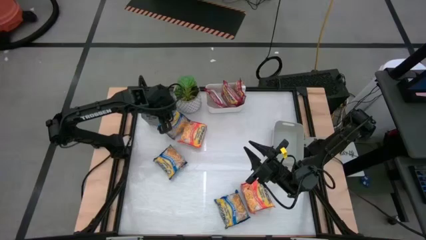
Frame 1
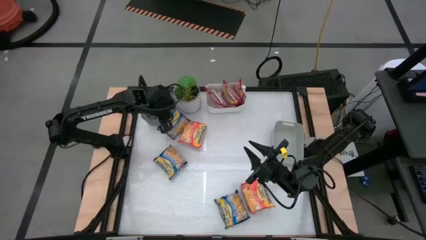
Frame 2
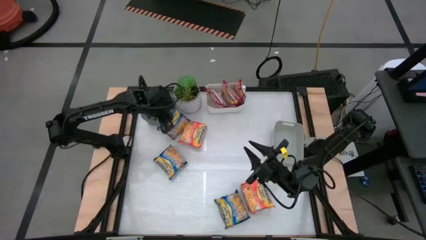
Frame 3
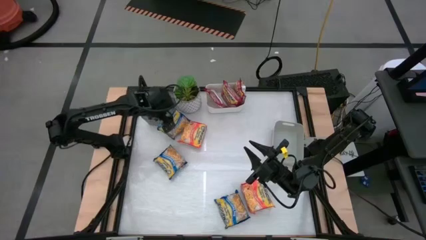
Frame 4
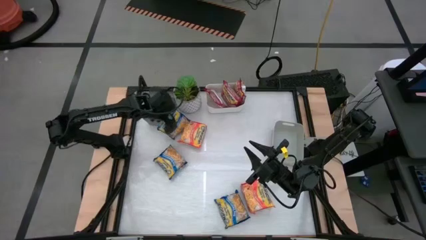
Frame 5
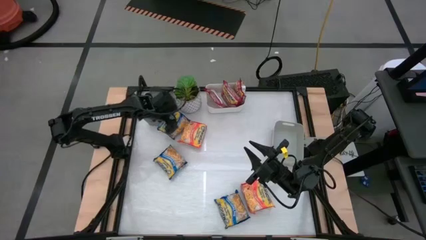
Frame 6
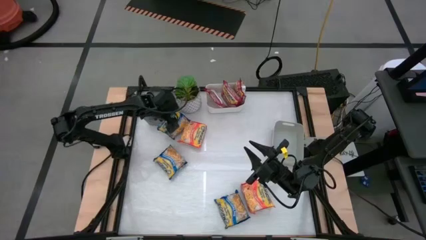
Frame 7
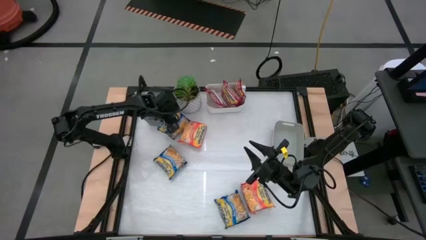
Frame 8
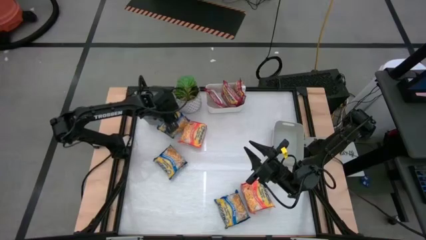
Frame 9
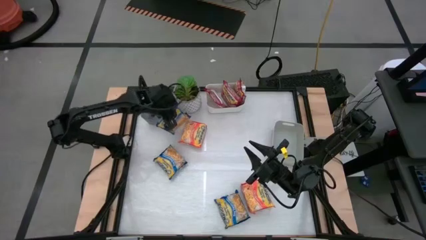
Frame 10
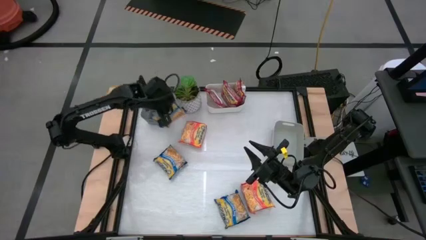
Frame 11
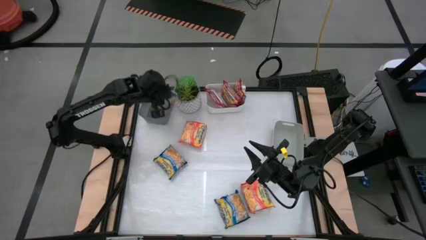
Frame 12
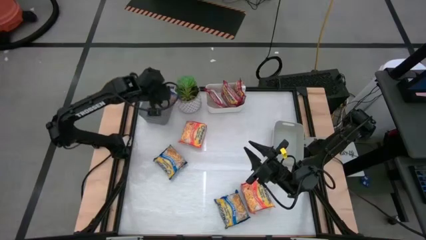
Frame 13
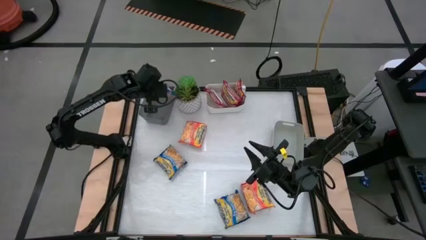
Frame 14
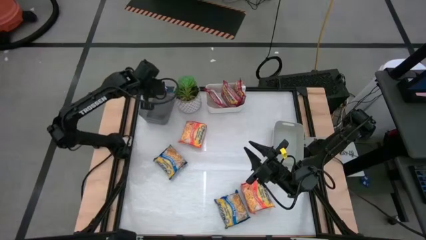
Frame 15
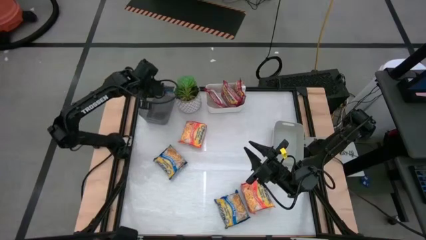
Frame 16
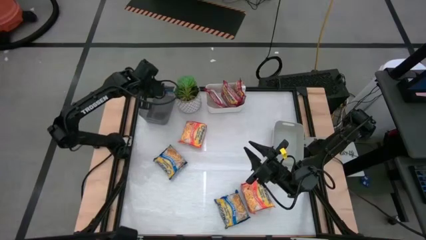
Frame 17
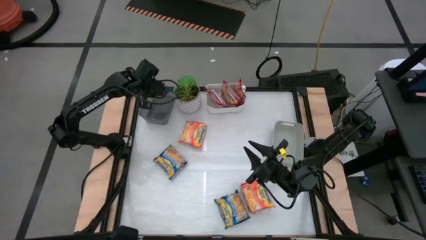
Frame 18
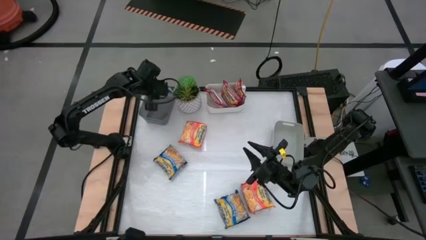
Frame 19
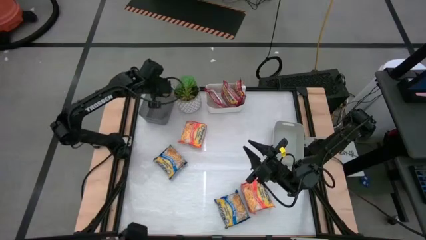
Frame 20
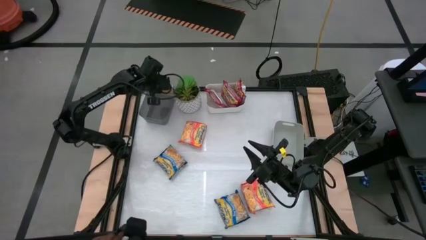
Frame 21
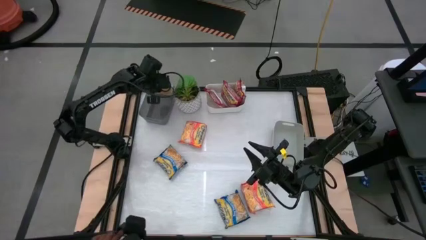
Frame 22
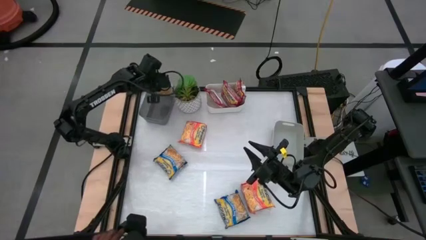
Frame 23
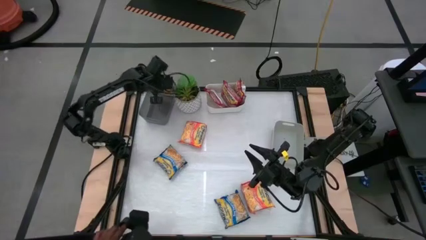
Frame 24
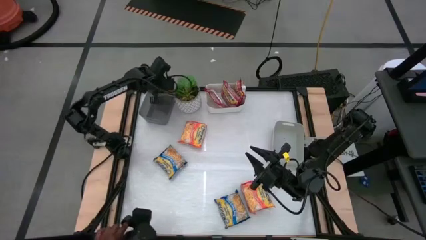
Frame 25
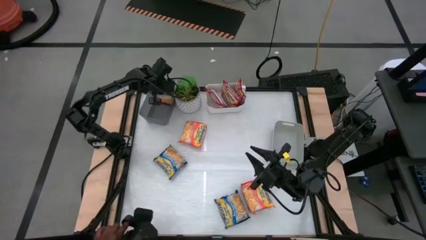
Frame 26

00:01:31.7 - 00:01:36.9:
Task: Sort Maruchan noodles
Put the middle blue noodle pack into the black bin

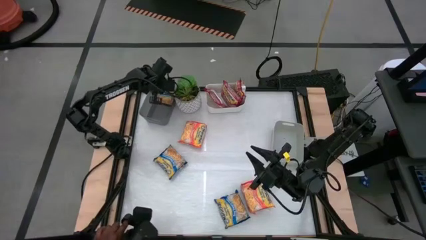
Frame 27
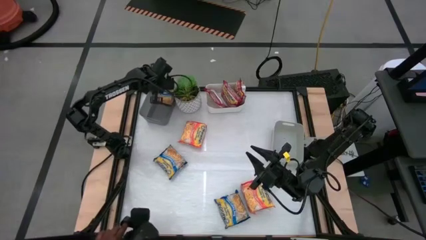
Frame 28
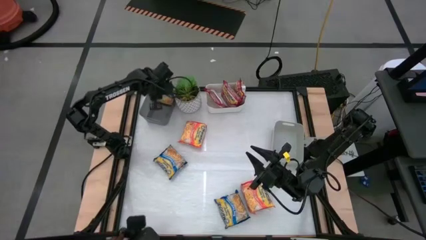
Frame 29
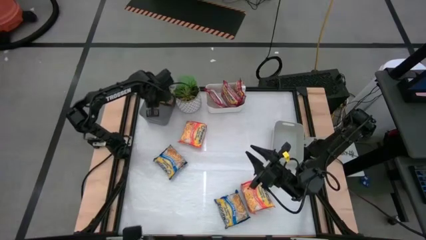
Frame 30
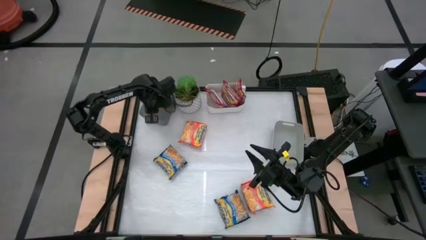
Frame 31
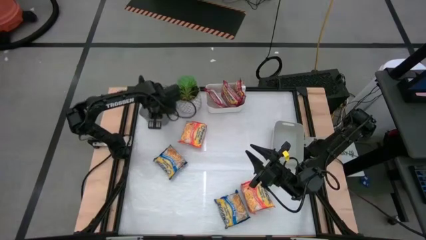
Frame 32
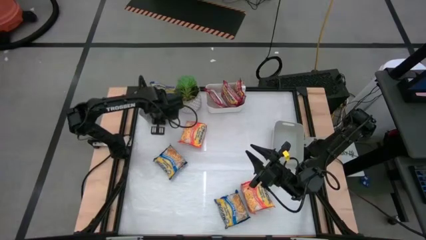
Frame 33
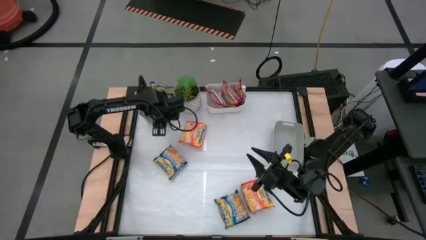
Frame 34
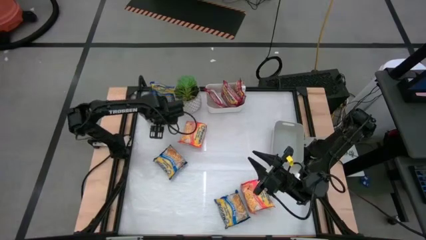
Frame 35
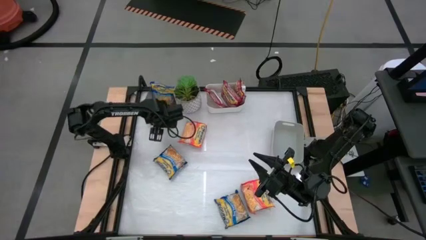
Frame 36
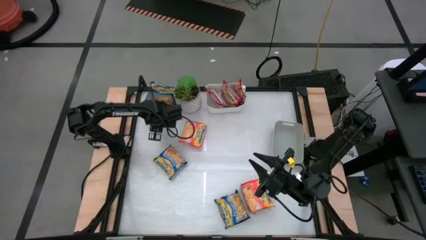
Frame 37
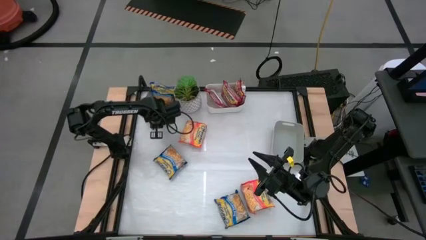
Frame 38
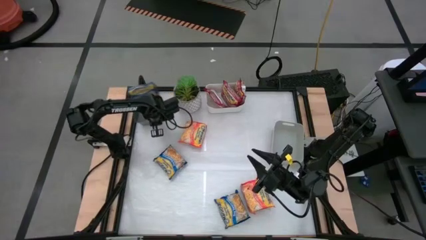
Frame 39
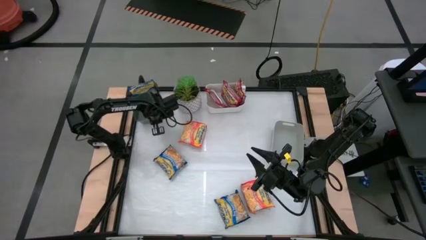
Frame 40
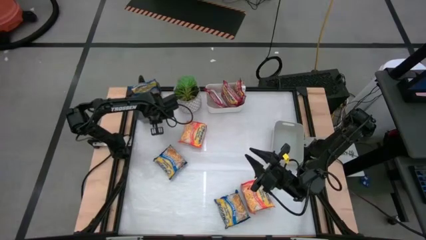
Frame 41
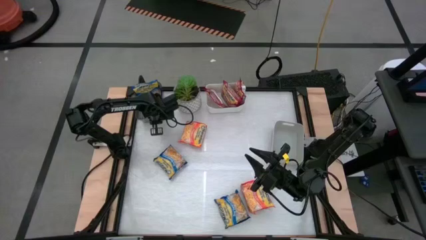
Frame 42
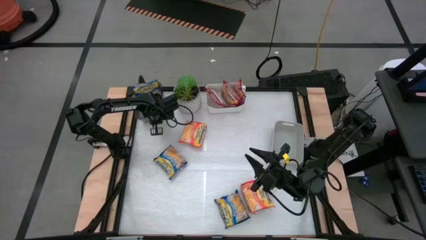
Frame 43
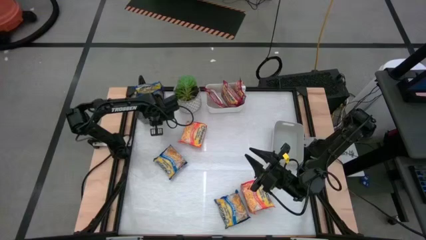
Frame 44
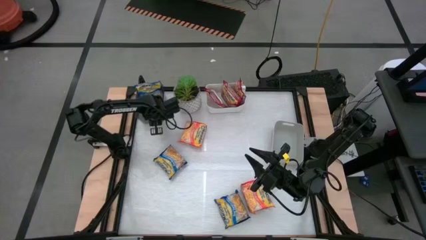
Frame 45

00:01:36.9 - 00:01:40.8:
Adjust the black bin

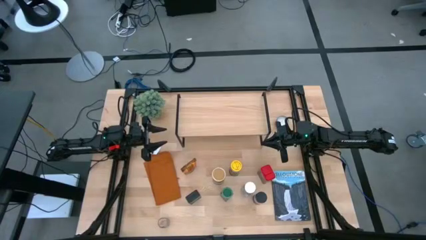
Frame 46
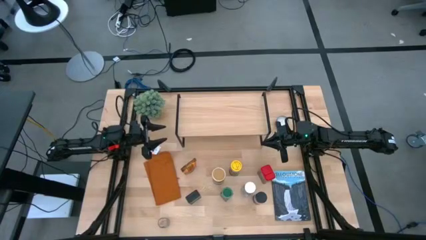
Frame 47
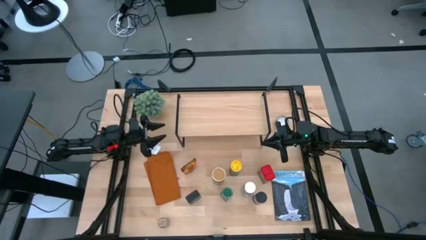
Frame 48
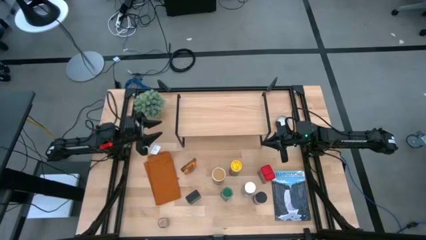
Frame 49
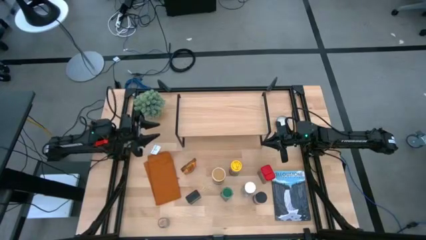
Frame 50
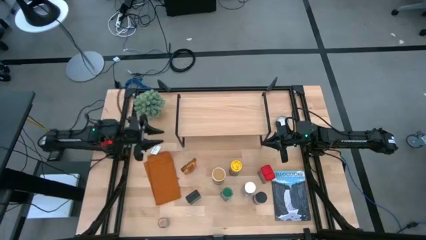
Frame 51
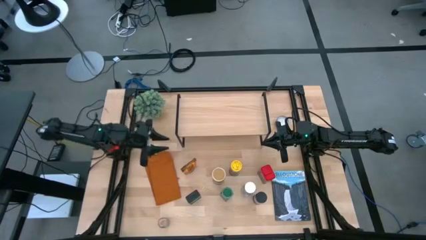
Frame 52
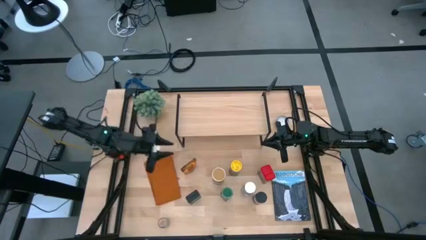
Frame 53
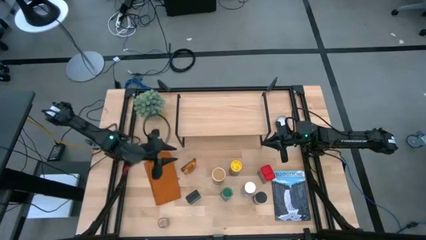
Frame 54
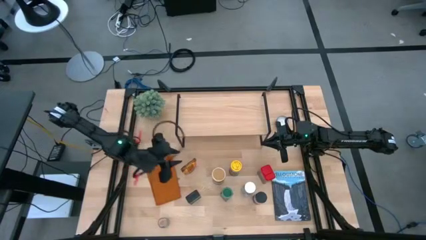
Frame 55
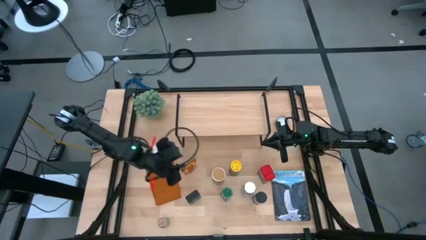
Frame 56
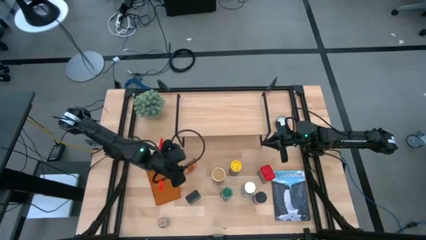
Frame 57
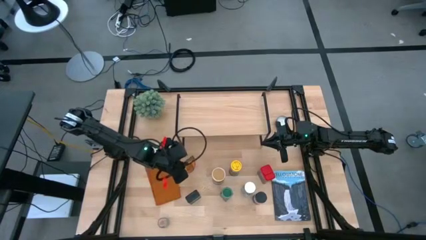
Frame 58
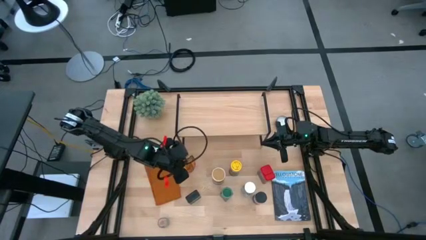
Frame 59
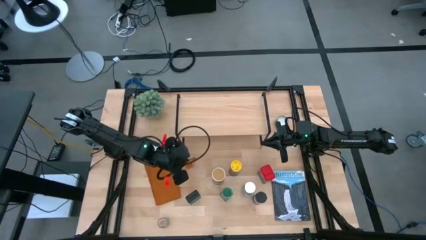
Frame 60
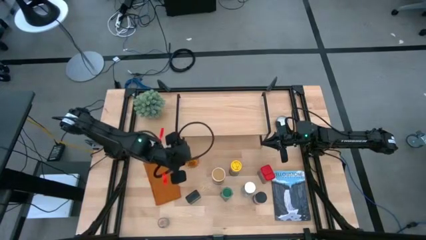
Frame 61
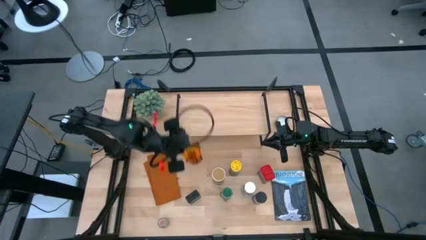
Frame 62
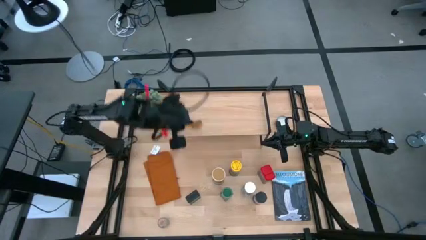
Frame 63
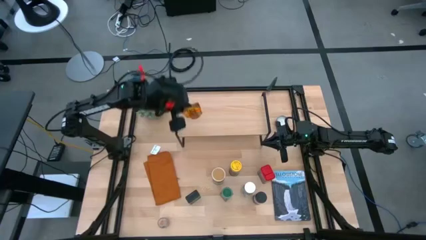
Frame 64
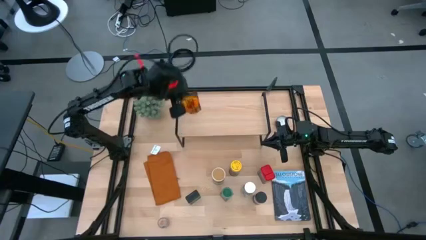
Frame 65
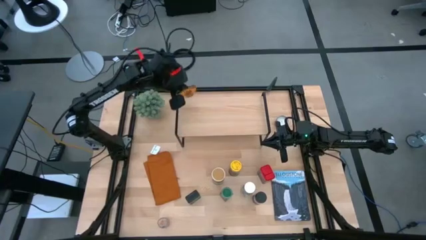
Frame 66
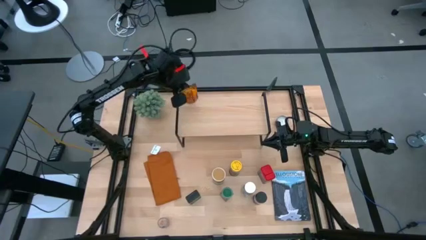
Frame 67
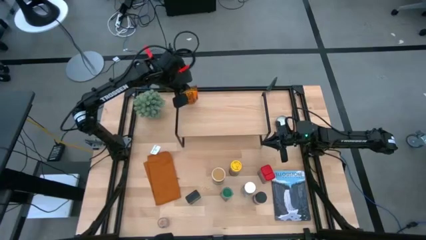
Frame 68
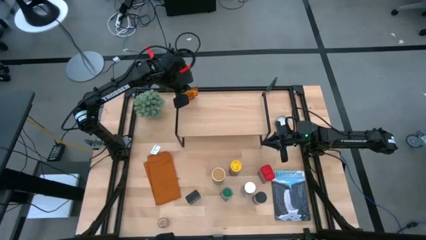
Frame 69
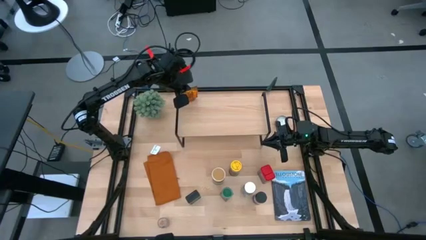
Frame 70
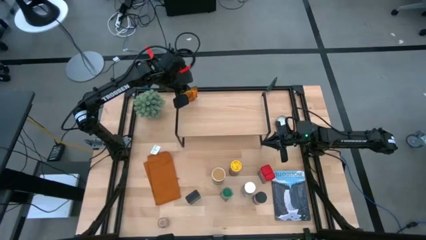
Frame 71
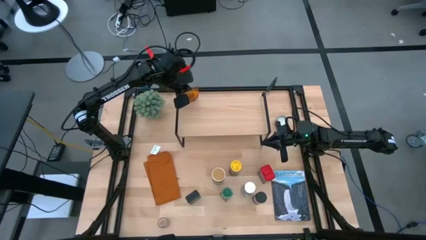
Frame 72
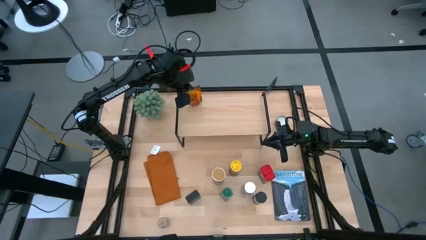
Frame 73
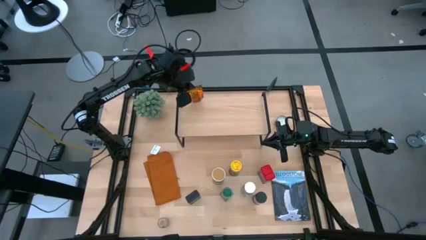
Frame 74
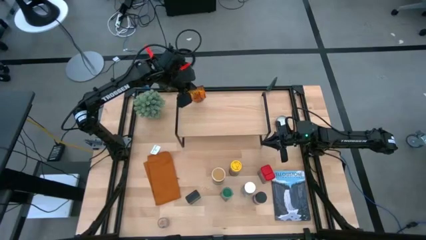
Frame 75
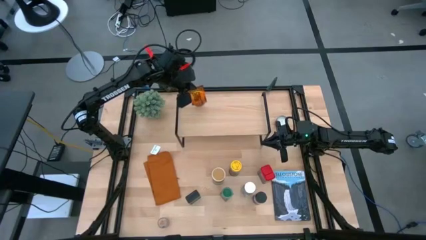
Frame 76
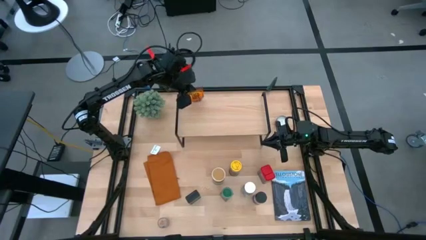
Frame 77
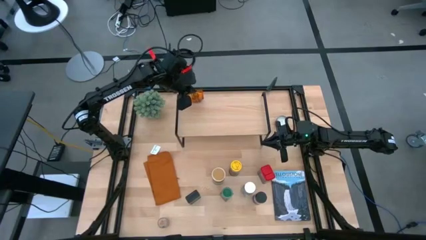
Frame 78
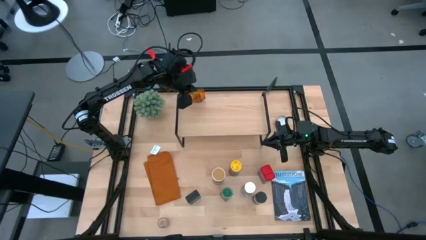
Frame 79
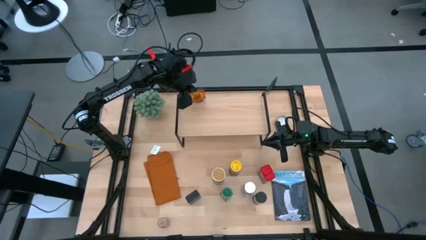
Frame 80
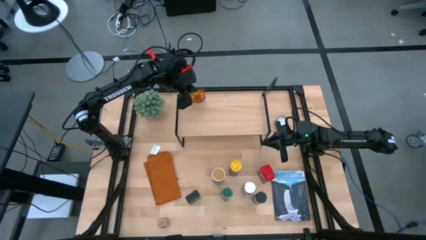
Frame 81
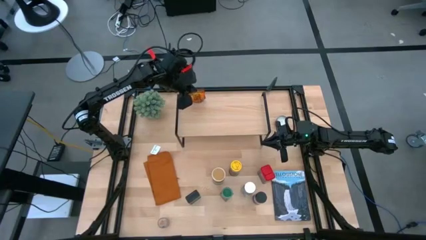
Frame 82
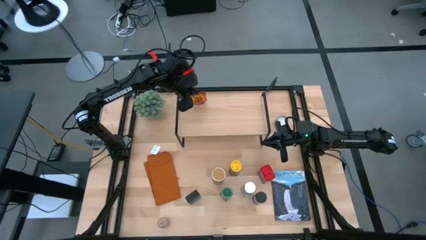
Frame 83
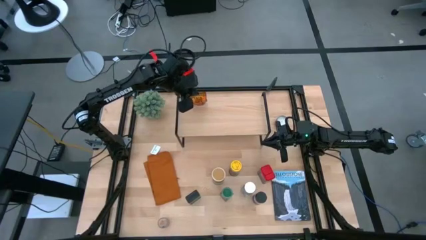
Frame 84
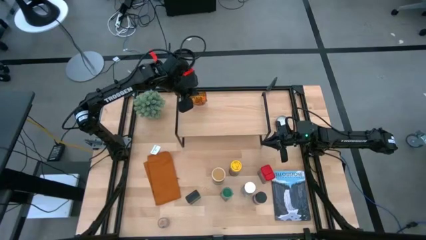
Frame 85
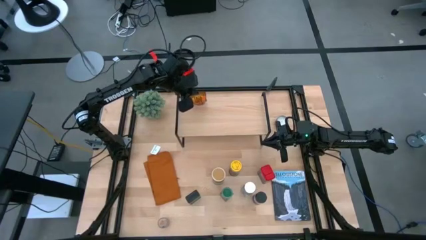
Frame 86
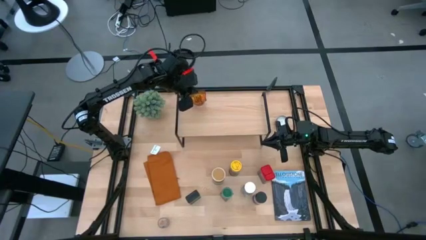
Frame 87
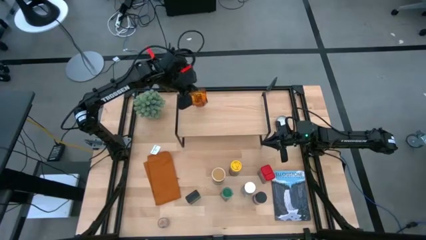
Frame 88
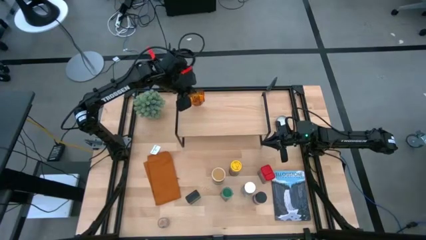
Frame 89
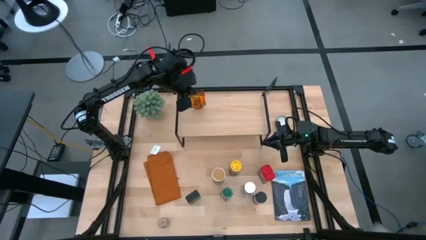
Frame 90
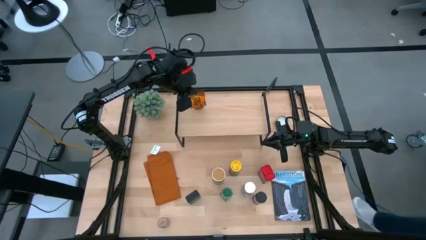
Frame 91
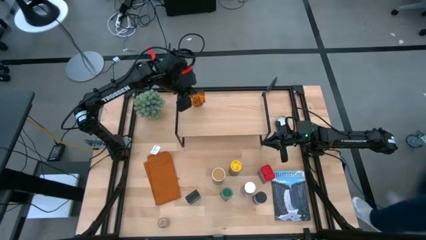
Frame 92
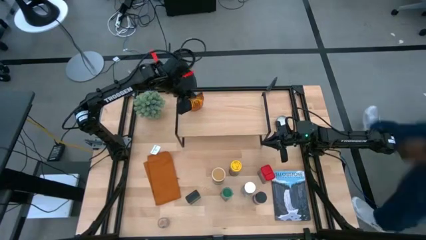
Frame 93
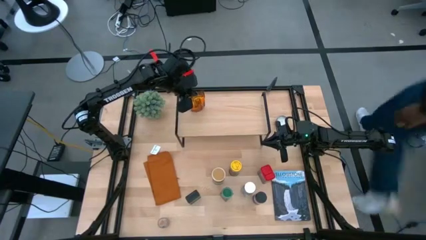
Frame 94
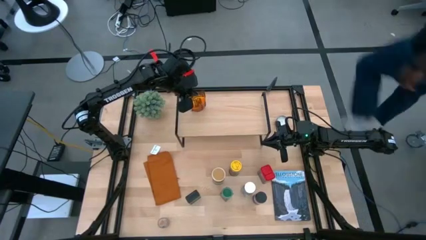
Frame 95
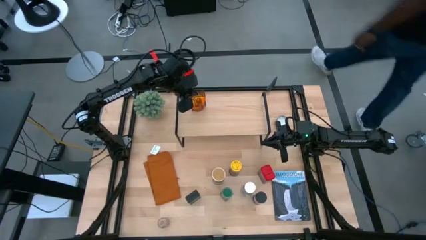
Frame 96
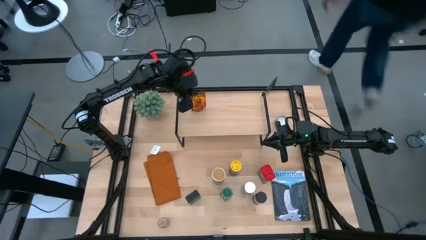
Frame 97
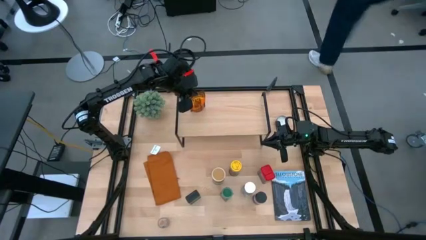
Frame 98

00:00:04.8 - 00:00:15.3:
Task: Shelf spices
Put the orange seasoning bag on the shelf
